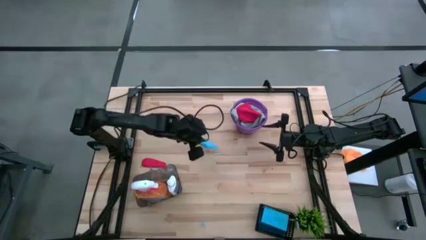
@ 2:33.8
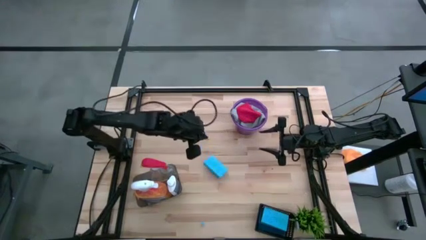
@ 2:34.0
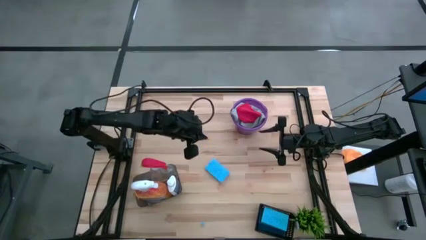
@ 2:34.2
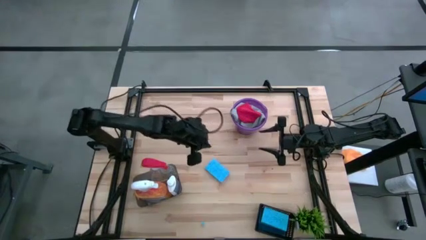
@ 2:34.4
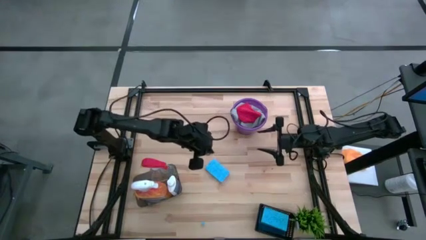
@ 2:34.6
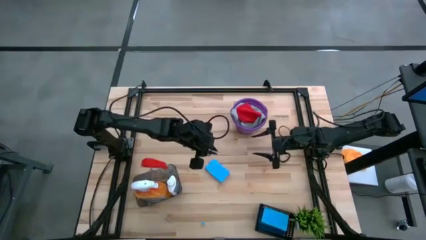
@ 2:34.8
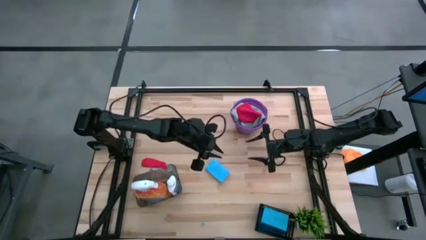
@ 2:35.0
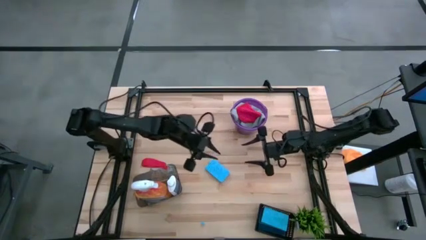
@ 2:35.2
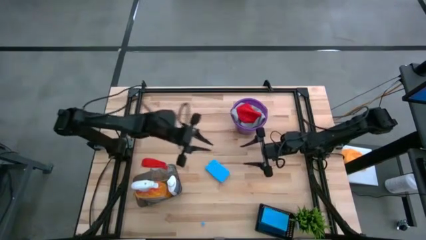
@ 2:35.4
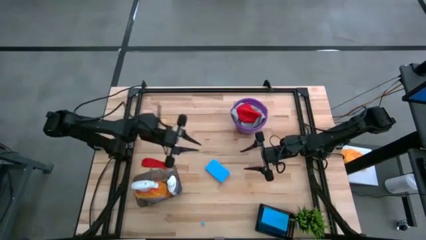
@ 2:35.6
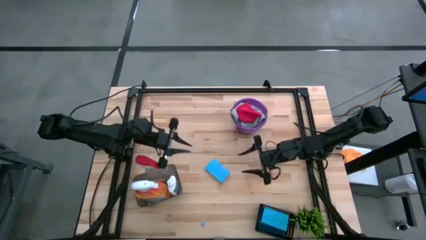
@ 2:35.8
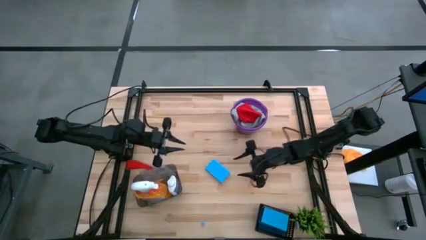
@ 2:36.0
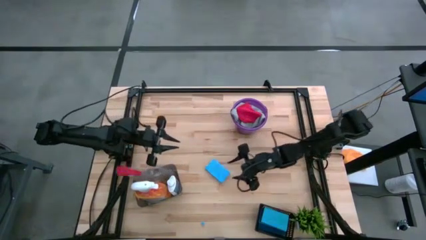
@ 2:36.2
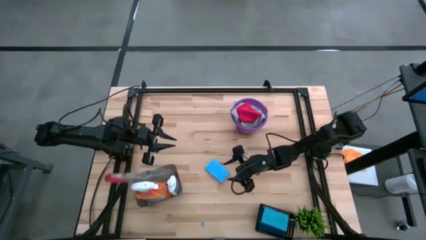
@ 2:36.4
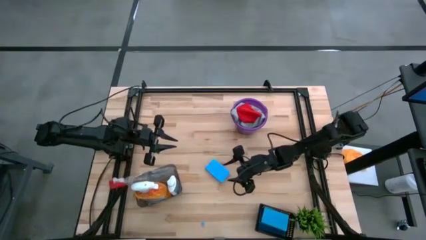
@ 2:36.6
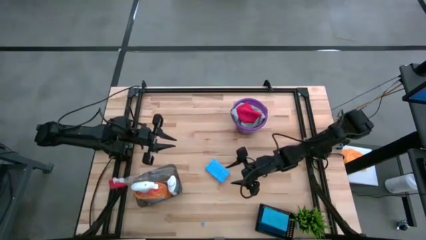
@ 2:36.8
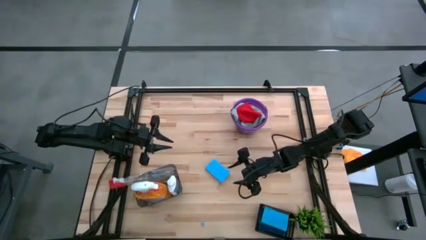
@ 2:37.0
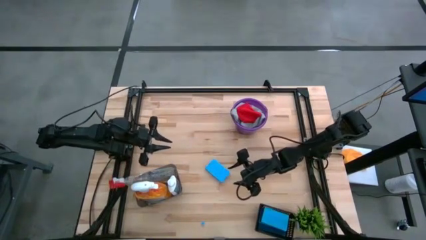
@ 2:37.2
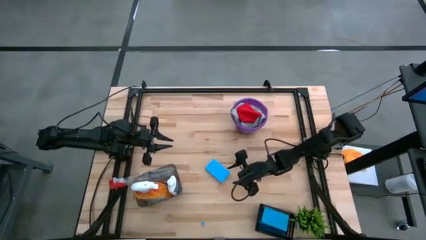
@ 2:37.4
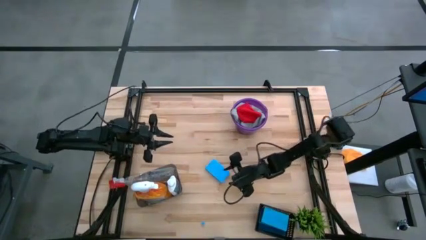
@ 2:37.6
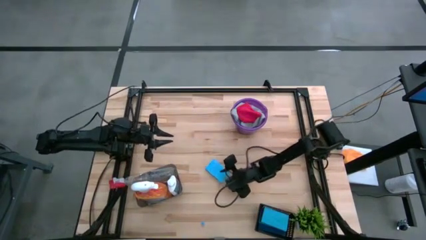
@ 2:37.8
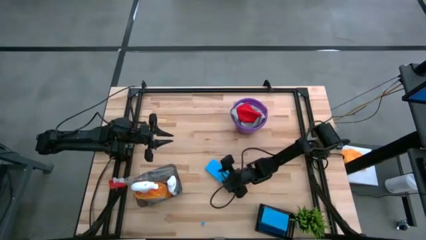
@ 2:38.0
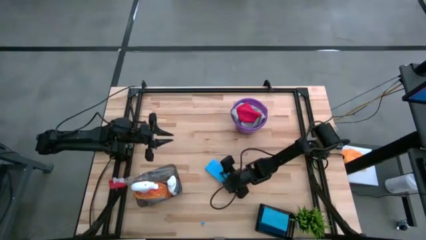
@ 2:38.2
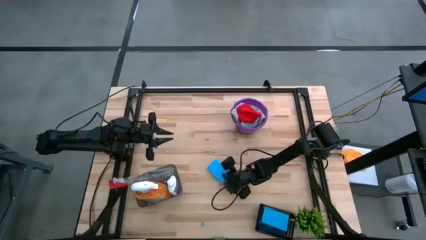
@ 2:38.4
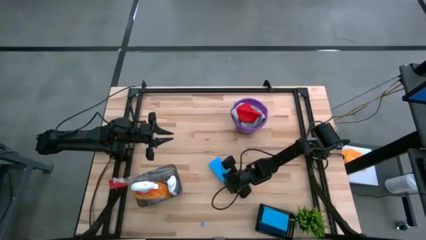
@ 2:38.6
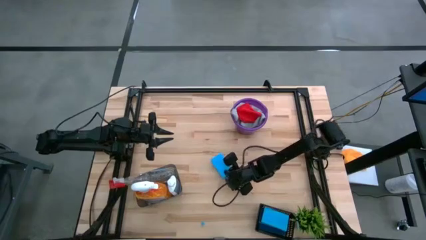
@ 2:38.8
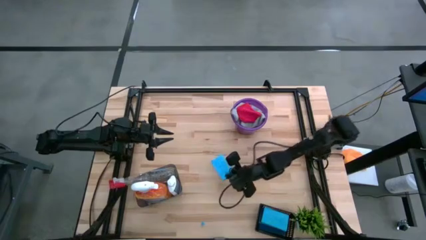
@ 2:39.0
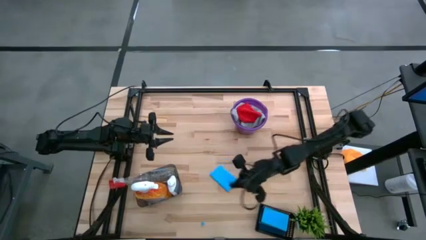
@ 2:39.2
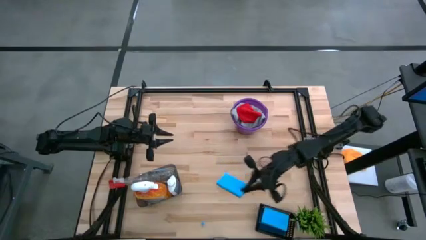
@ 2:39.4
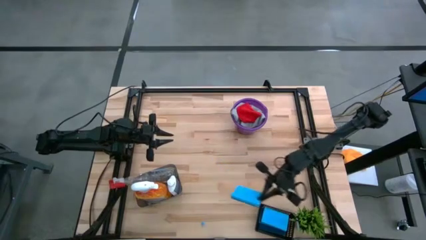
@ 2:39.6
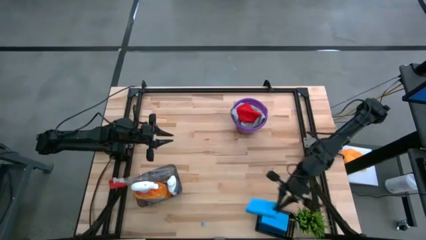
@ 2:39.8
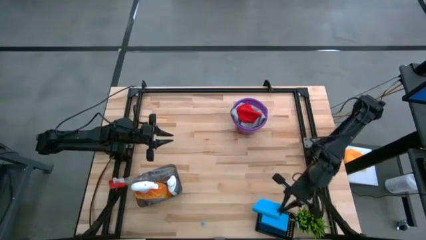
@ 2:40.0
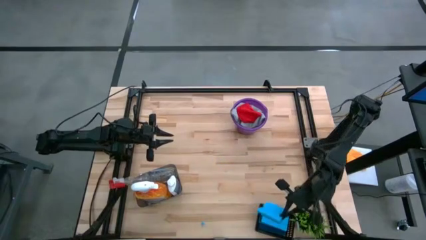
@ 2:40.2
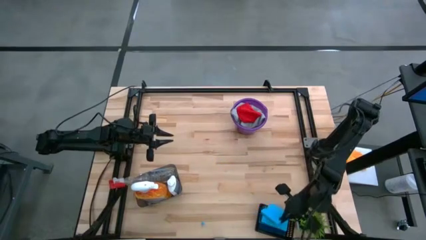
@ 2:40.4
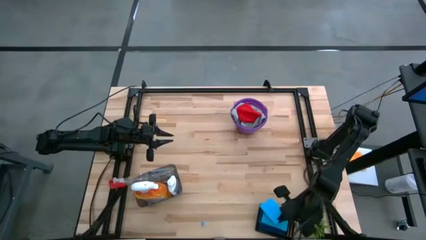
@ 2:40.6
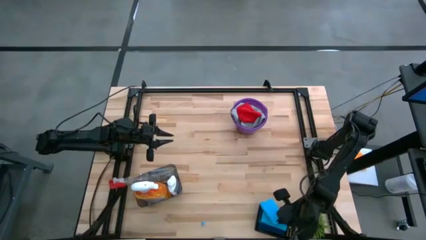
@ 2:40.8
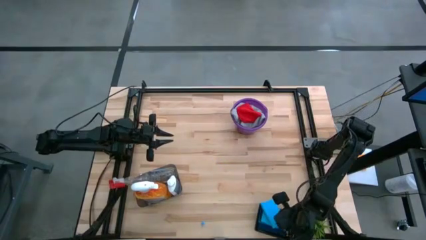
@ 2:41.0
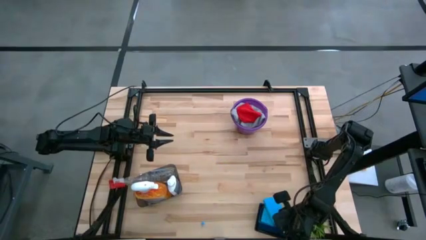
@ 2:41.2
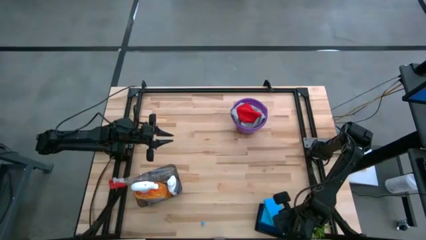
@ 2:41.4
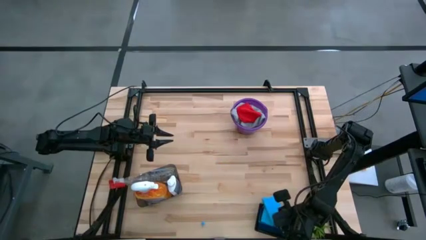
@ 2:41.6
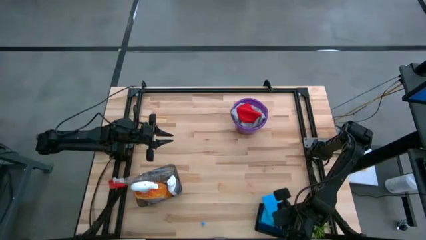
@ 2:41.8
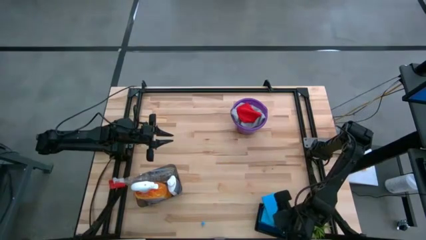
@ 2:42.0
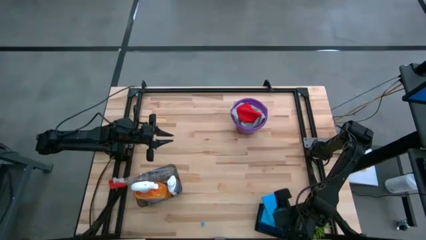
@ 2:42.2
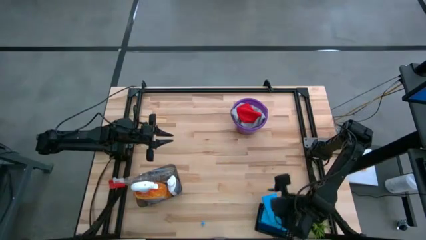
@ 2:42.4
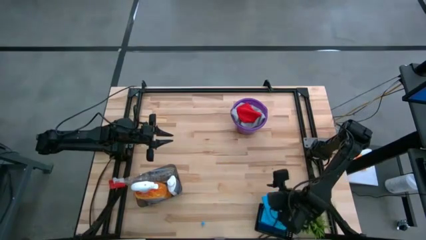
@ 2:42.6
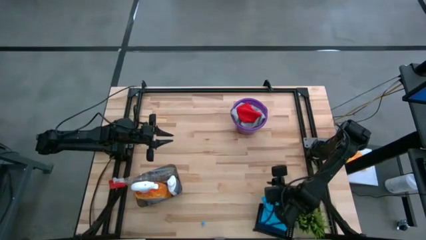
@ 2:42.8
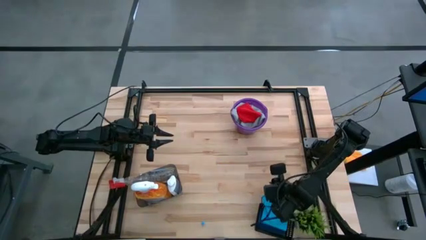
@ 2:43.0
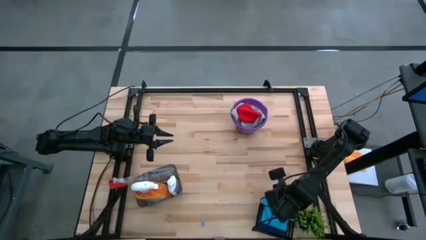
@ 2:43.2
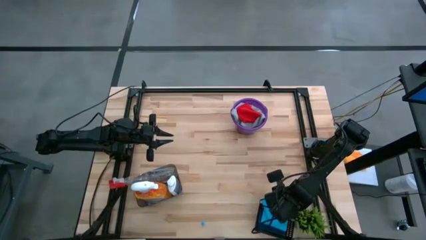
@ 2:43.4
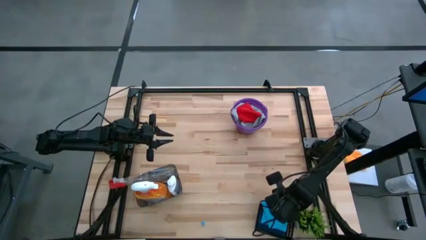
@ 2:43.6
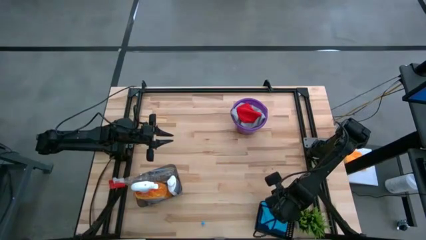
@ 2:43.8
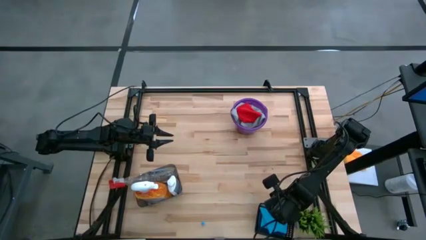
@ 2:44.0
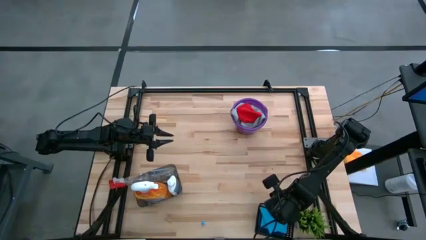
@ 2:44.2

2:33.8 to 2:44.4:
Task: Pick & Place Kitchen Items
Put the light blue sponge into the black bin
